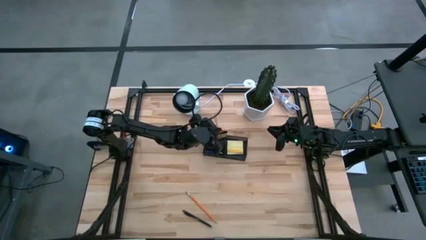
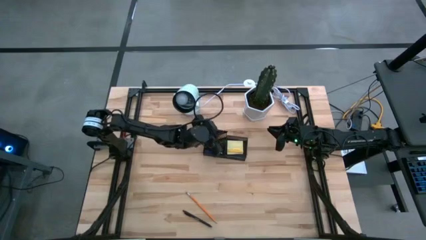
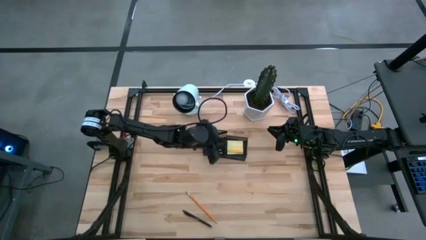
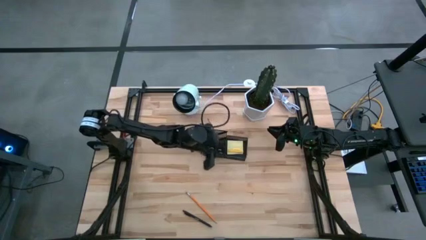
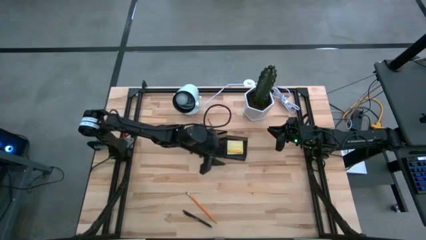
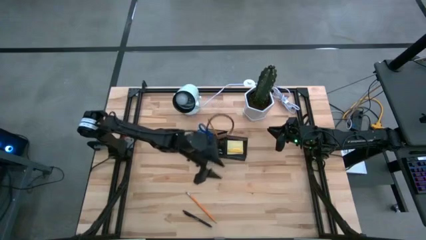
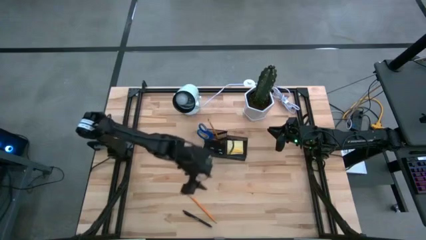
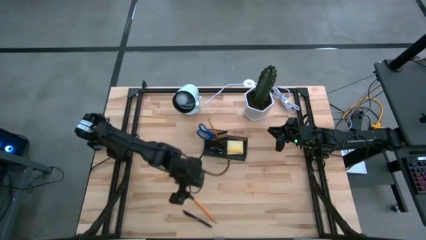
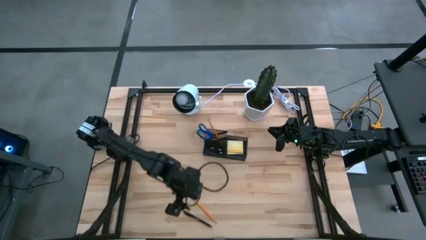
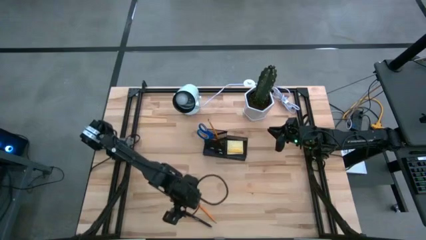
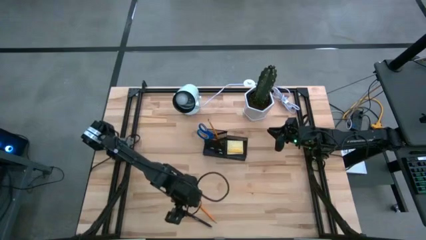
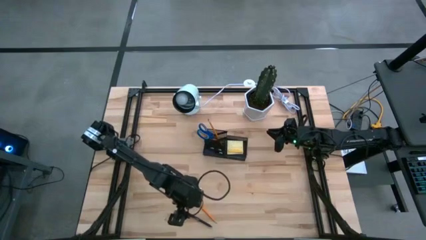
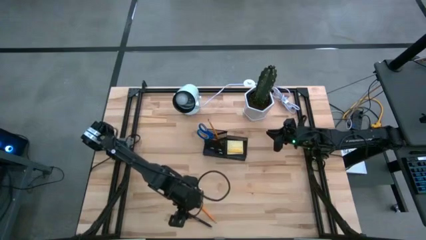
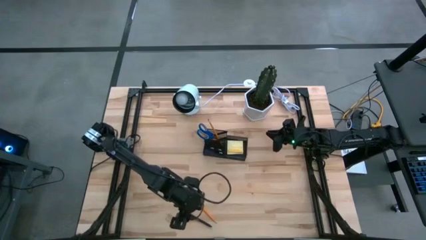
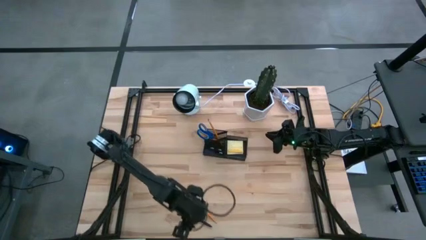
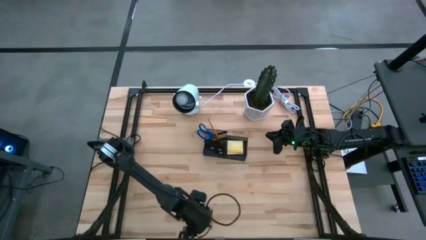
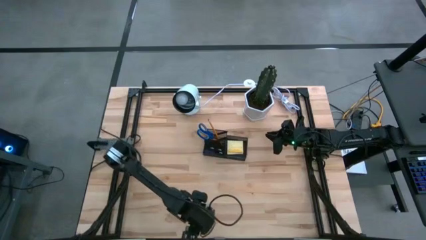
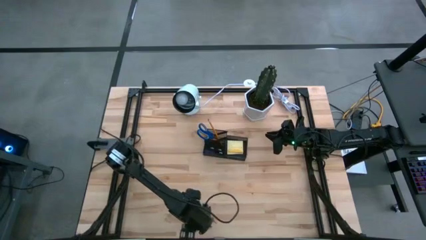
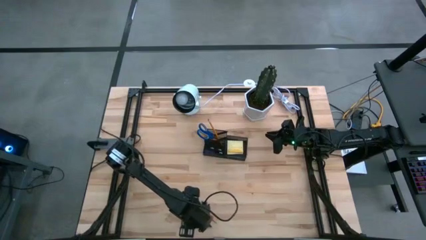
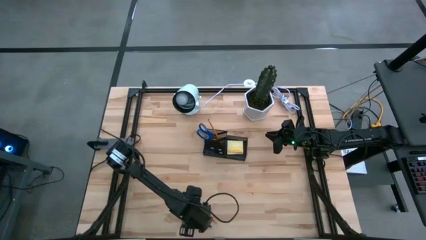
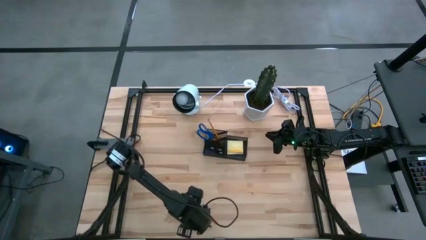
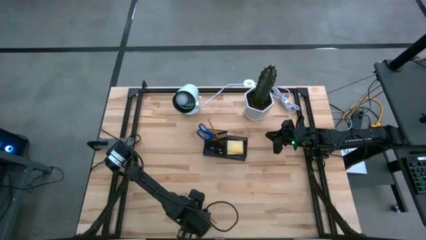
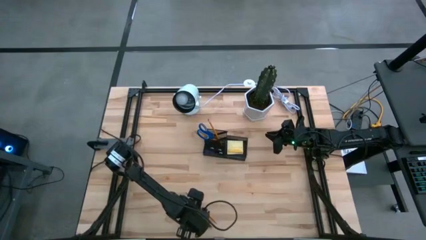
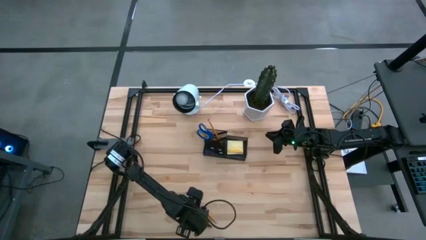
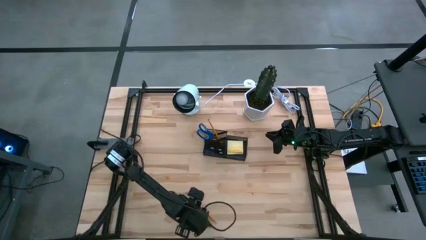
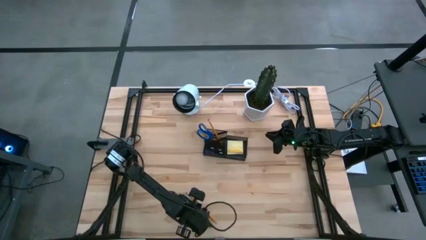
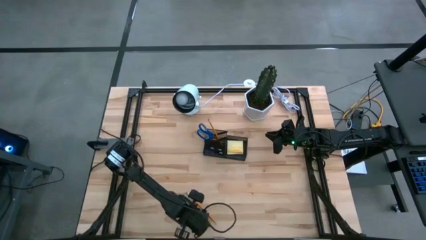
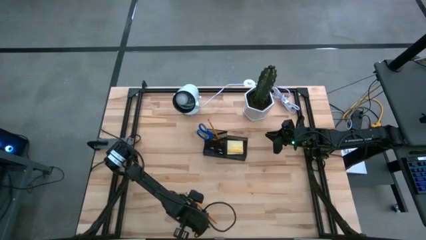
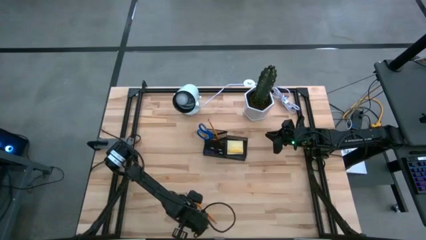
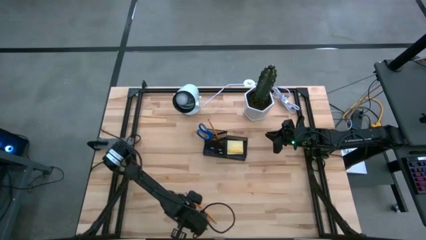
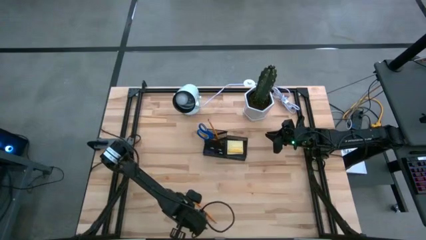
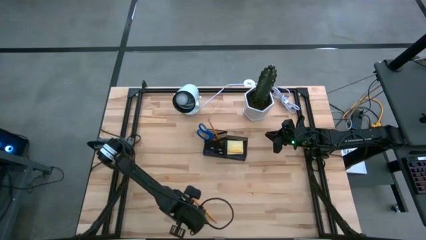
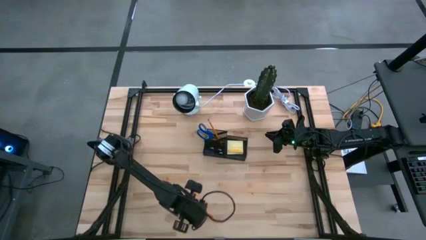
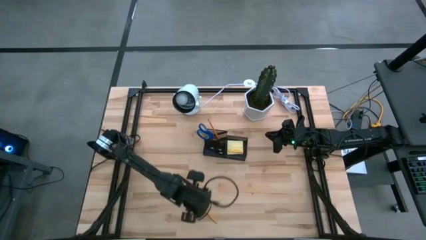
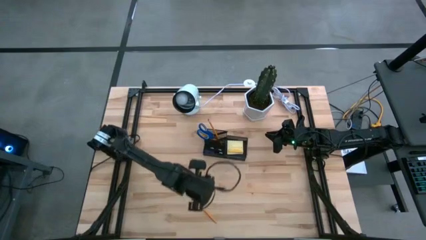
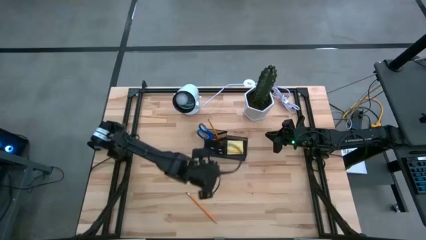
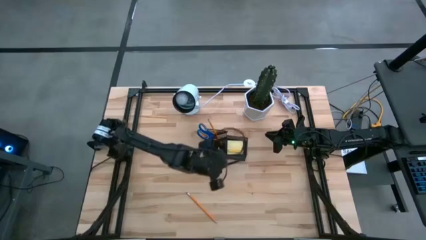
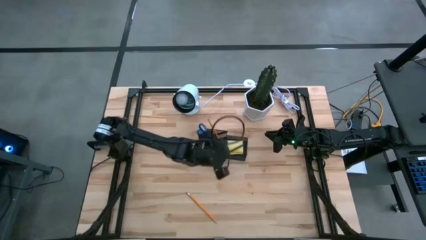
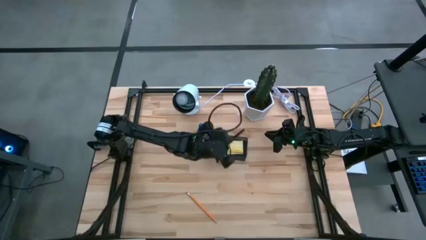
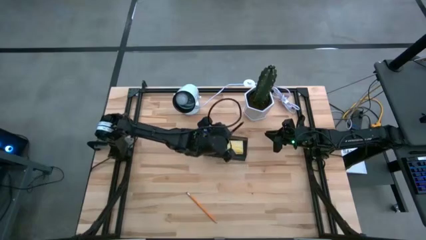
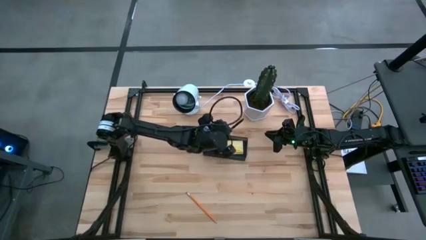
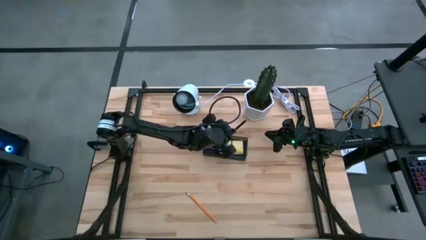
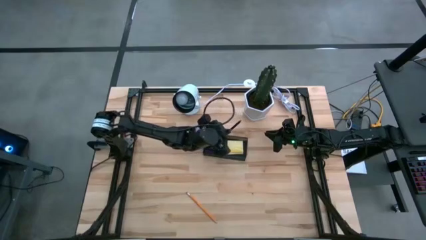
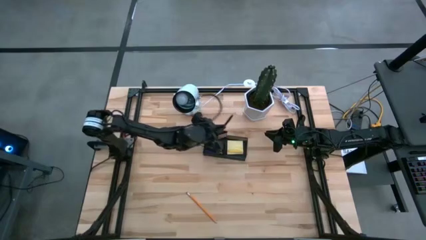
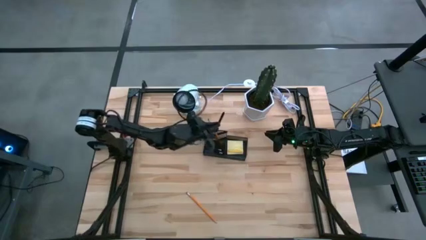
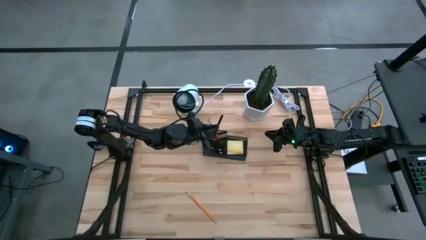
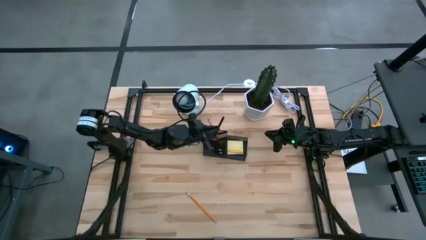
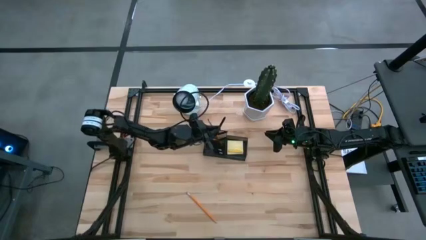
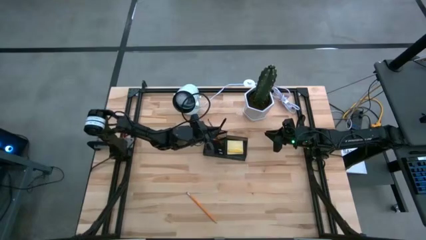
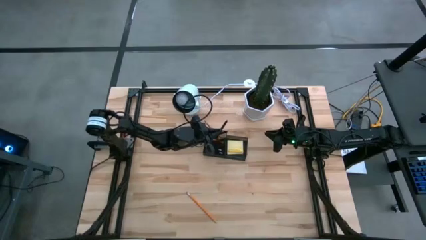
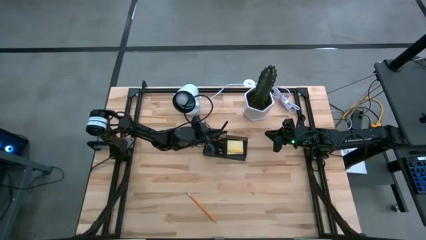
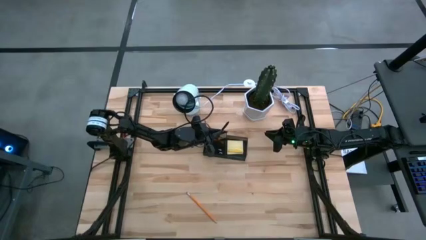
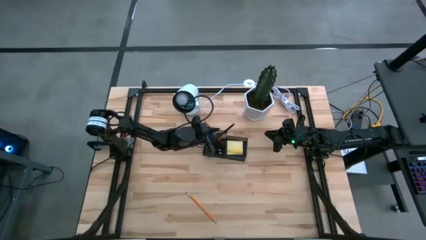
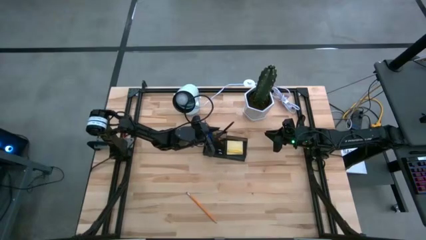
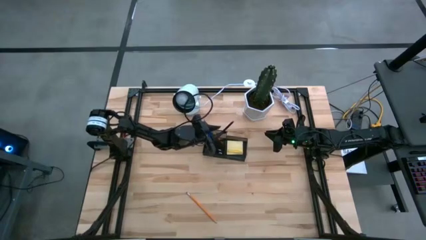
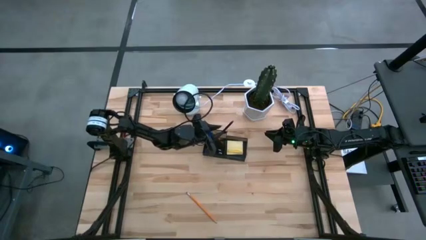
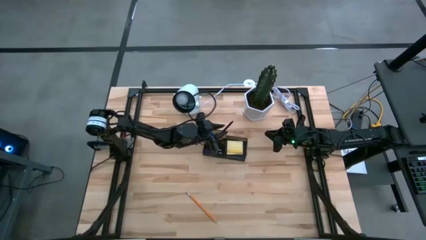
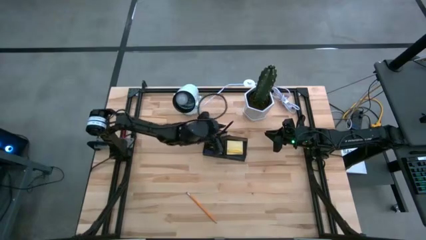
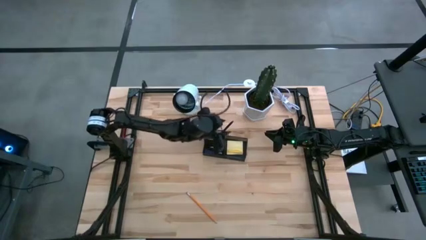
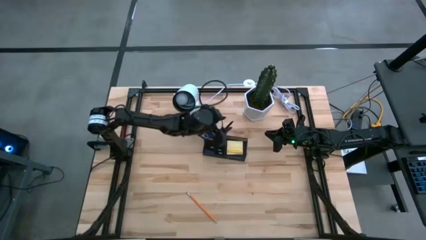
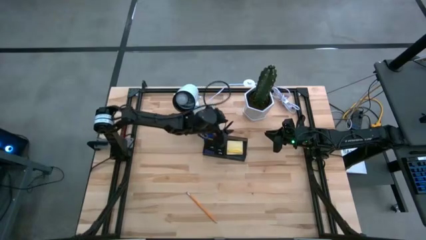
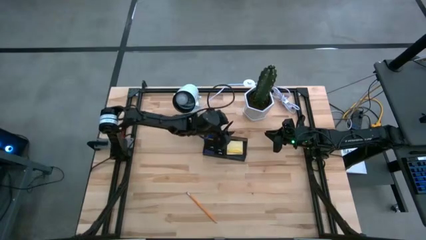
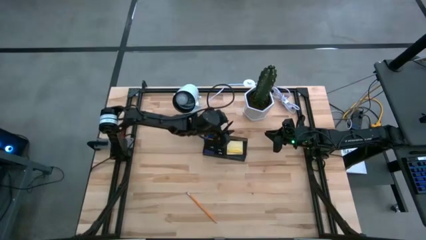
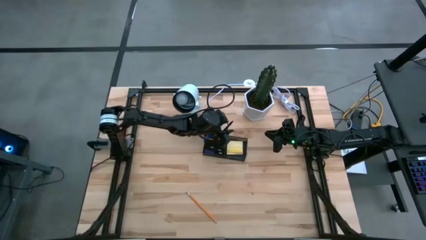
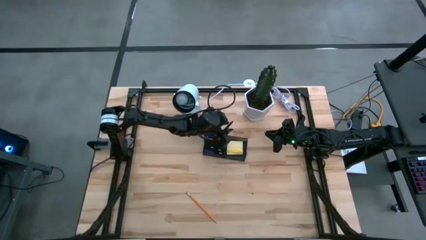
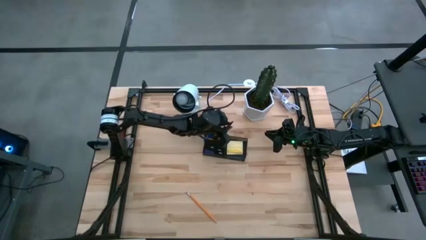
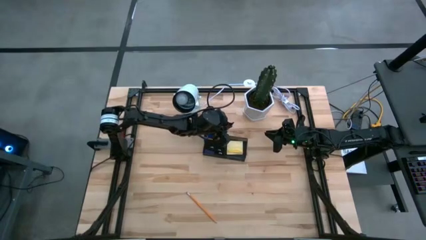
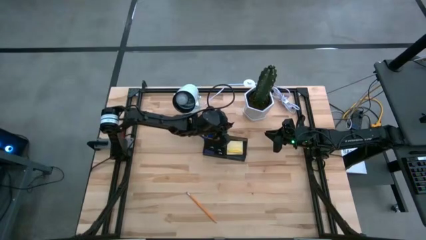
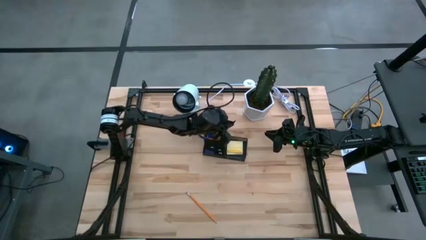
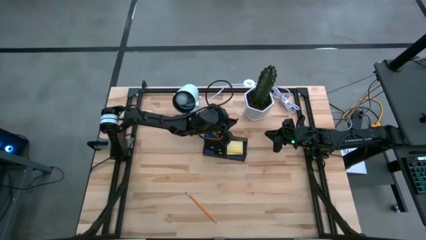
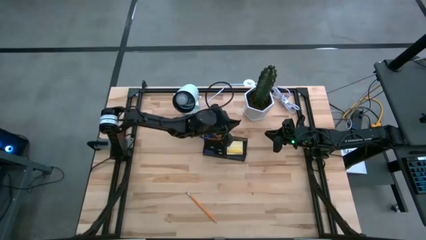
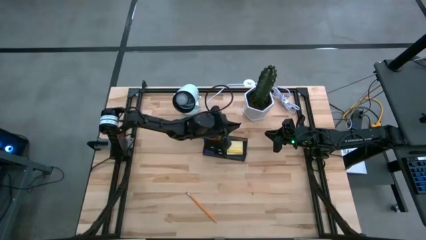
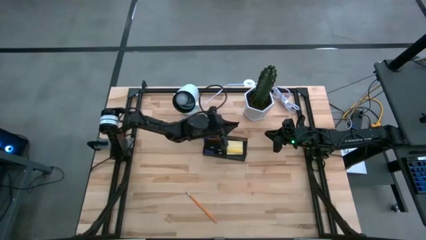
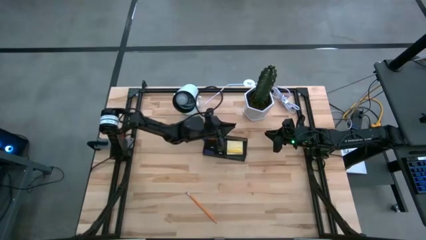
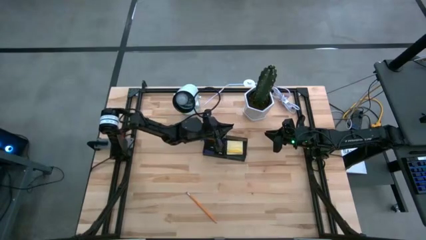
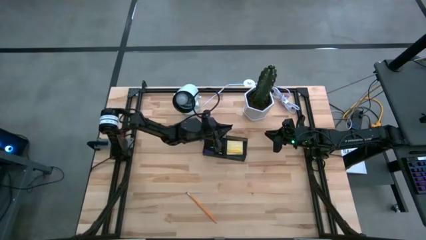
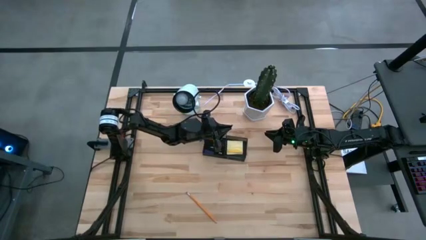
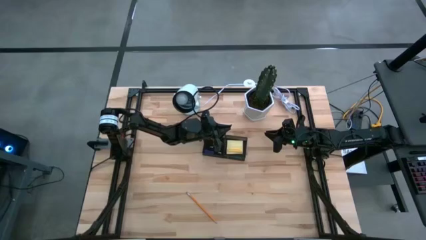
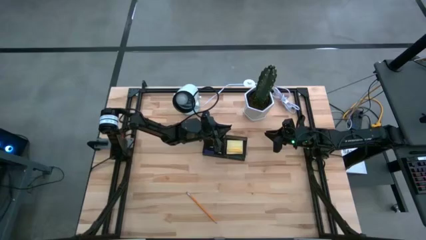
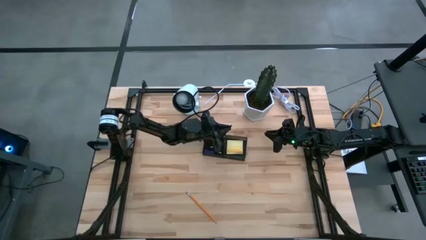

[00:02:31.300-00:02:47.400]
Task: Pick and place office supplies into organizer
Put the black pen into the black desk organizer
